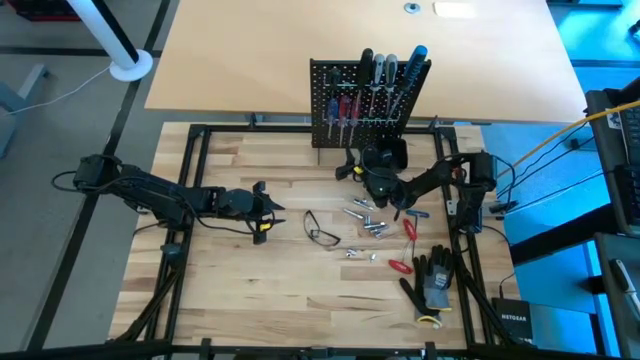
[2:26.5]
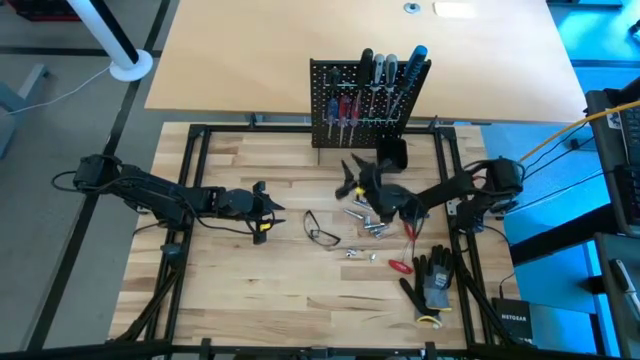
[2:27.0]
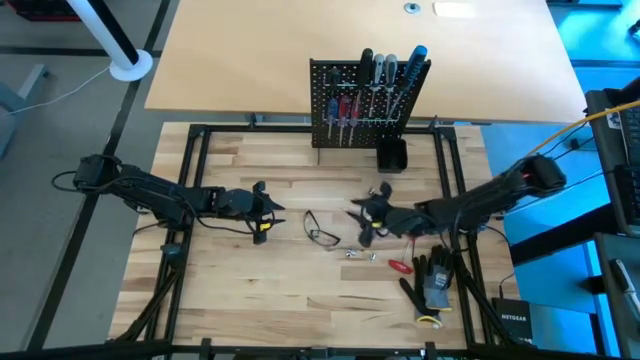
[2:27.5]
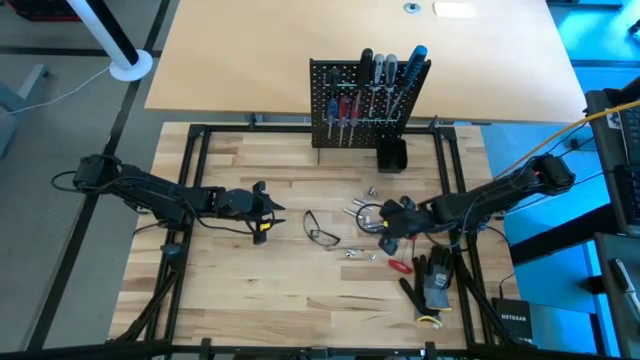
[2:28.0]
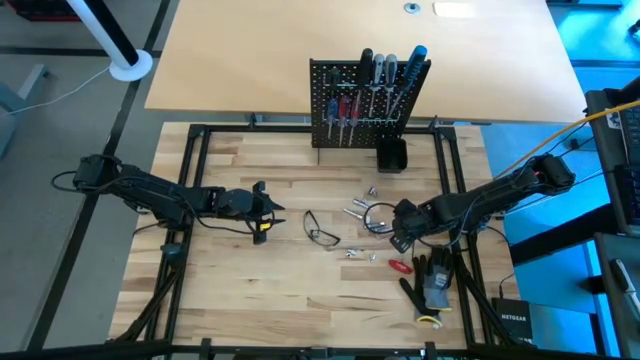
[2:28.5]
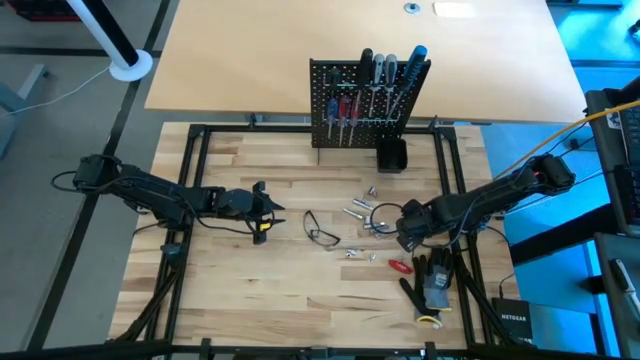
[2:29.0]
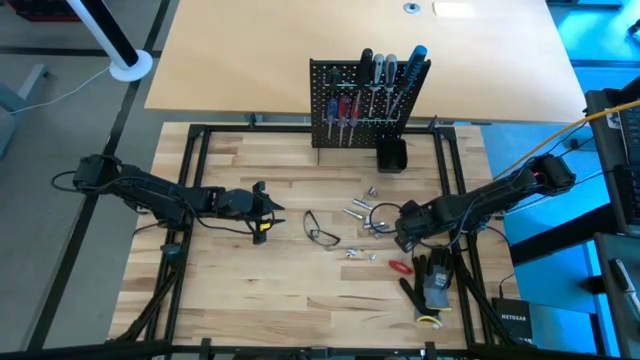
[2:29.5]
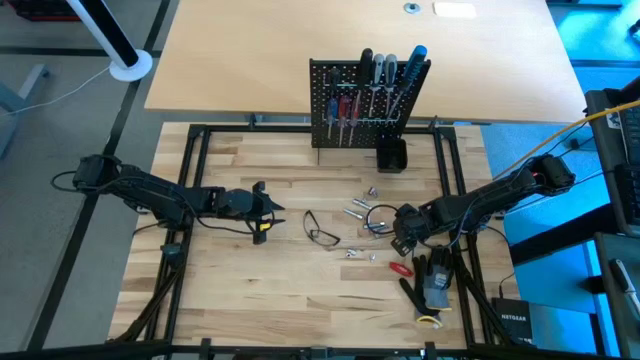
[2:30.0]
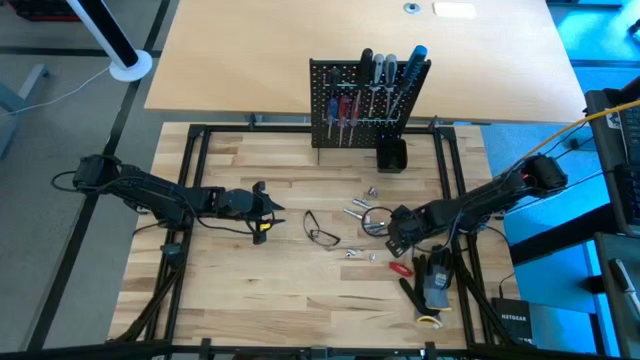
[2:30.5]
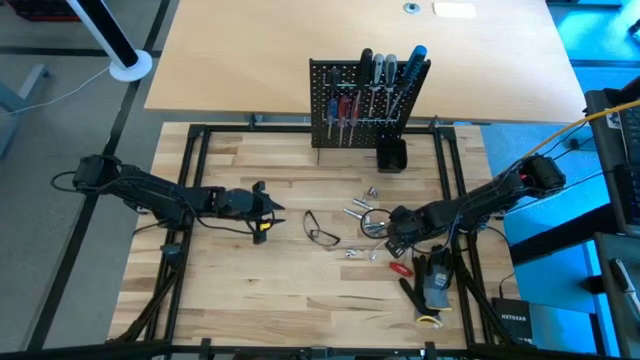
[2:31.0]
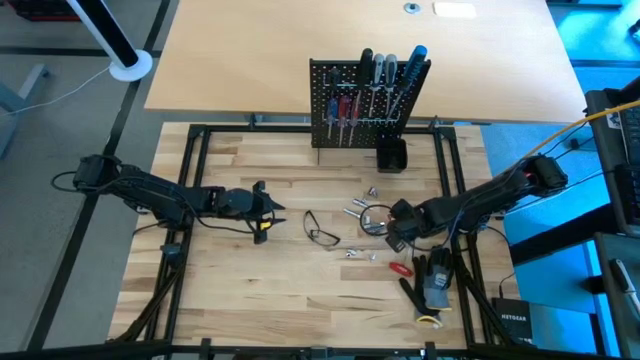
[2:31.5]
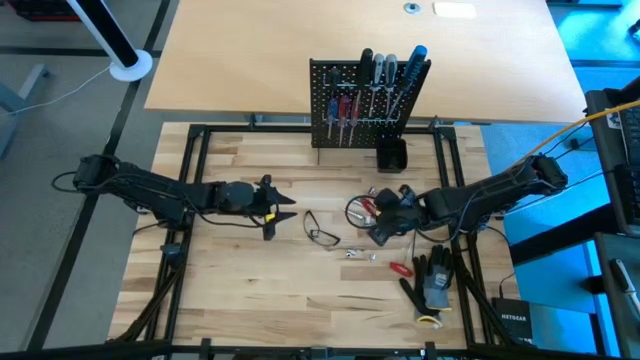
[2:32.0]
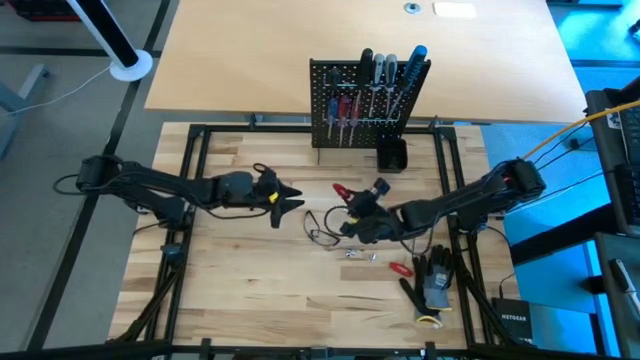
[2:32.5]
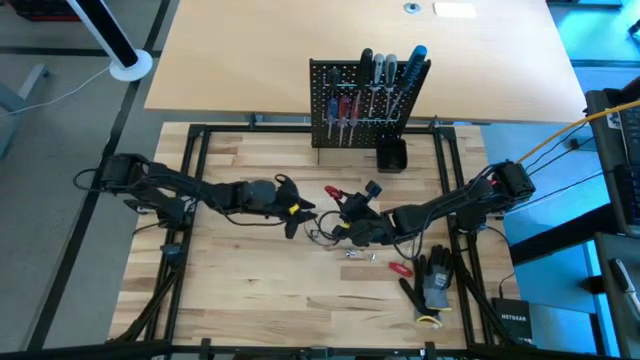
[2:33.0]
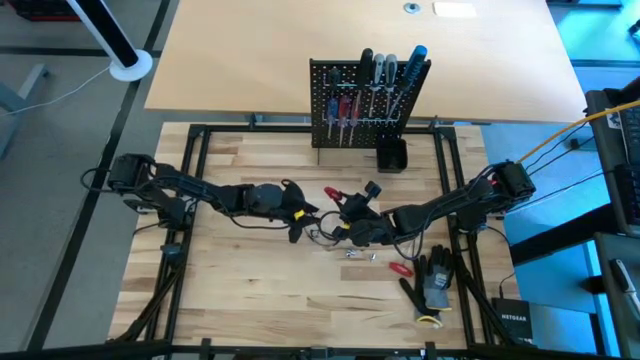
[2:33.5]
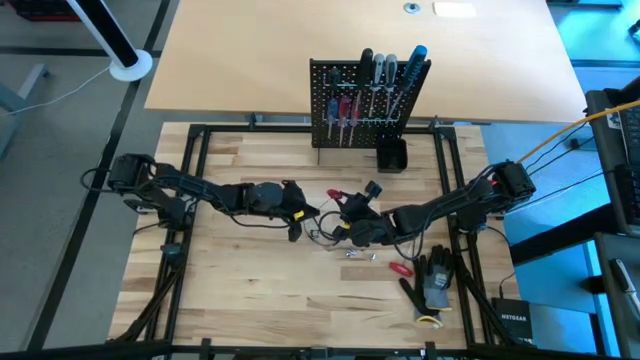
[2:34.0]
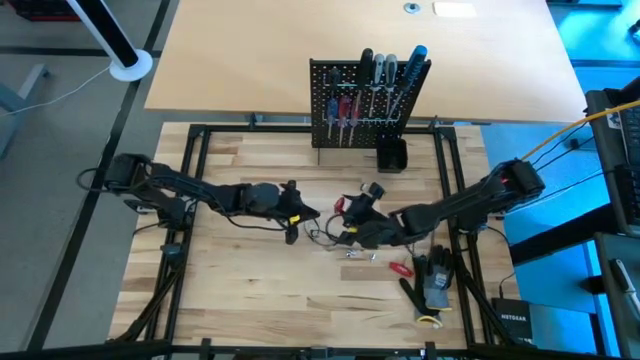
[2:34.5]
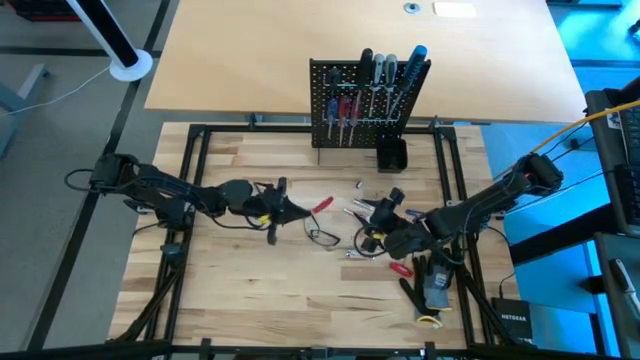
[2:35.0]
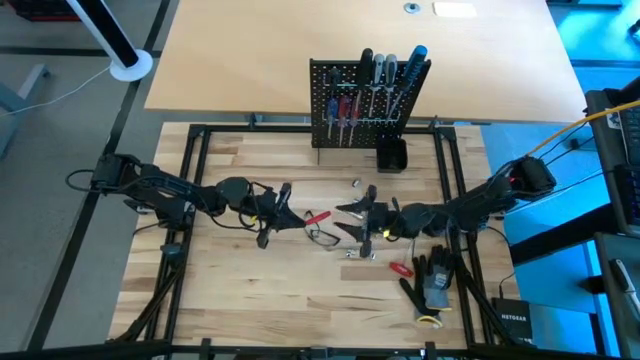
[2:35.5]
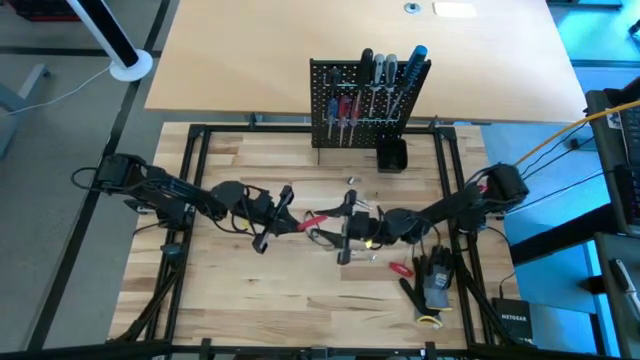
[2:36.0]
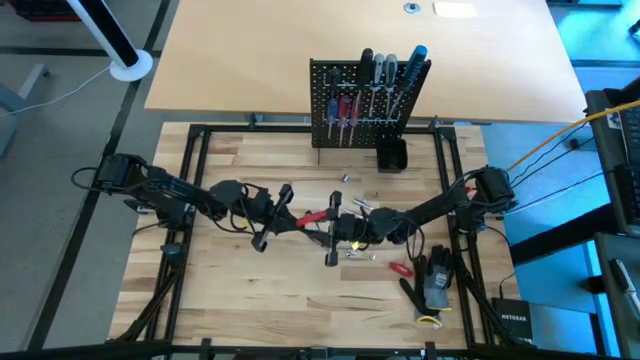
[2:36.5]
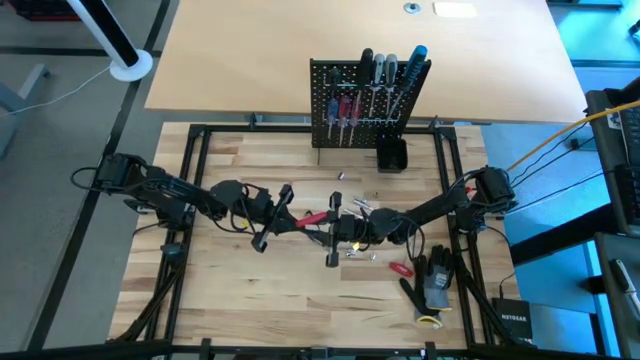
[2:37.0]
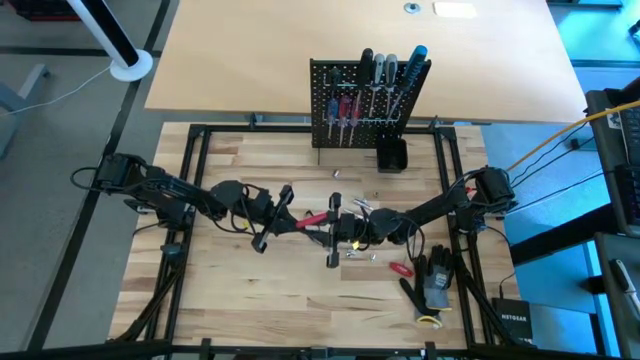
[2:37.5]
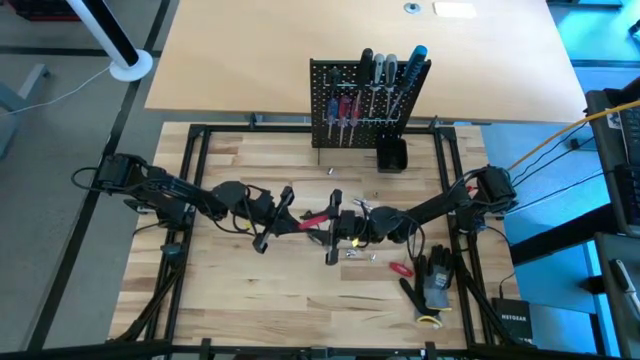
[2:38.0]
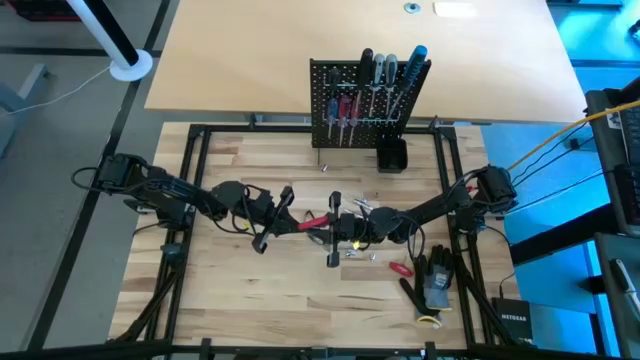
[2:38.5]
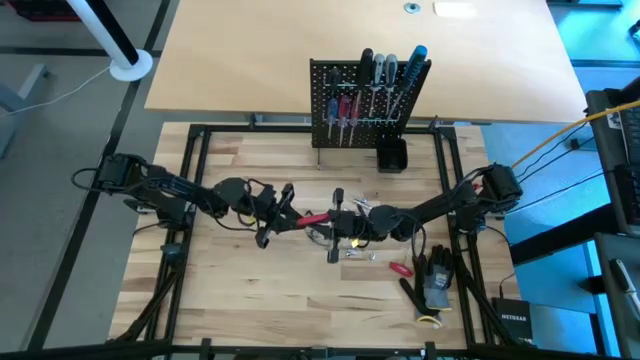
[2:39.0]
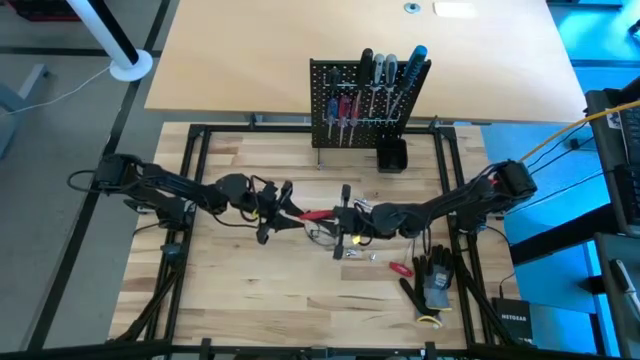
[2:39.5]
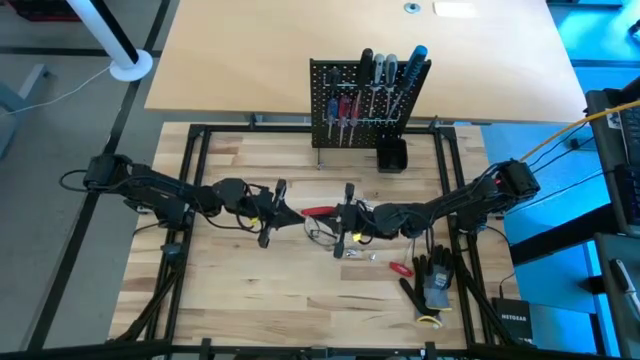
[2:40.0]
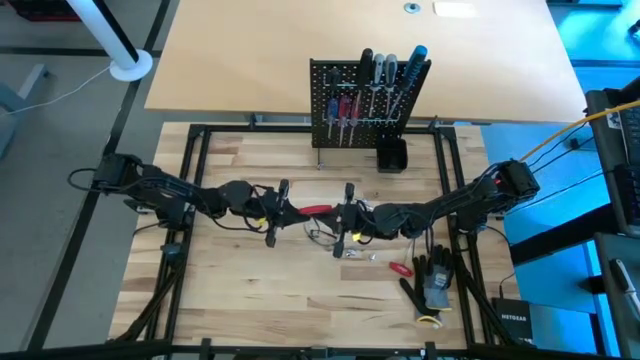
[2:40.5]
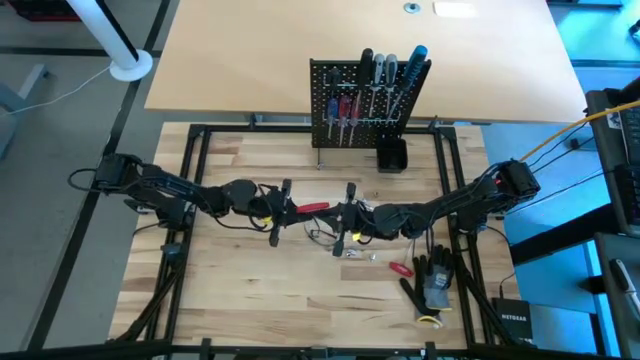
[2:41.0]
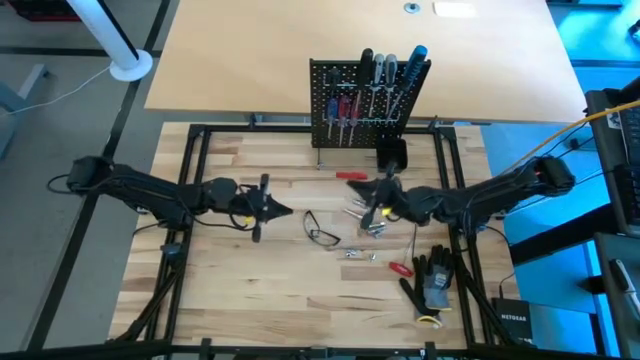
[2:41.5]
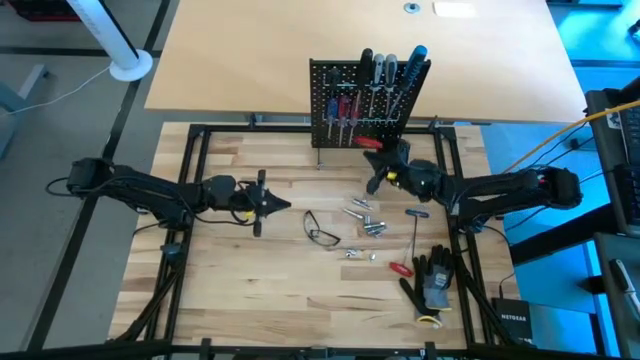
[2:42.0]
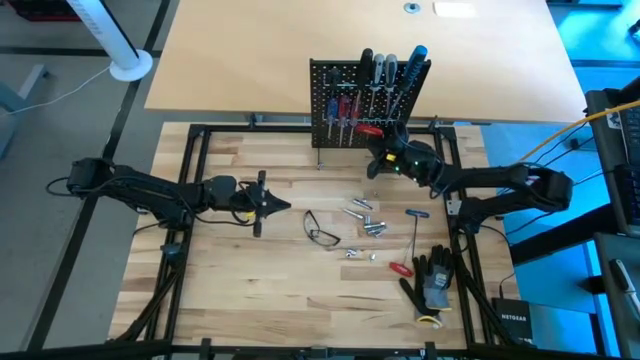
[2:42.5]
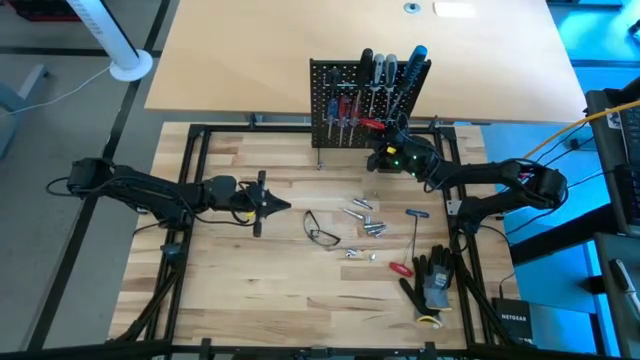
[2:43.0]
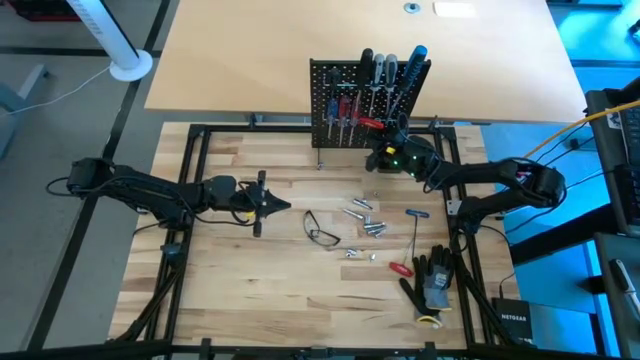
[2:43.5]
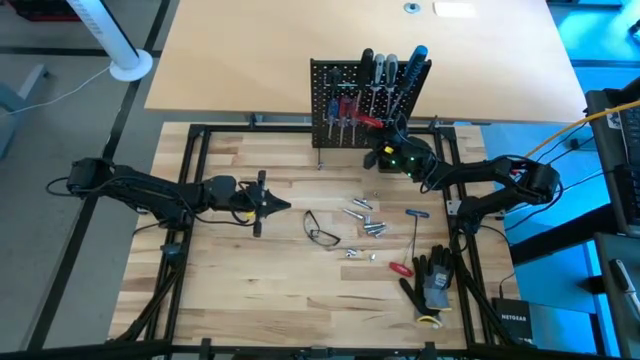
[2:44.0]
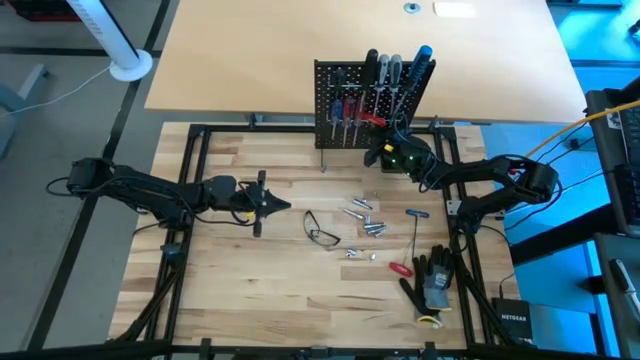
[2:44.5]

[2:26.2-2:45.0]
Task: Hang tools onto peg board
Hang the red allen wrench on the peg board

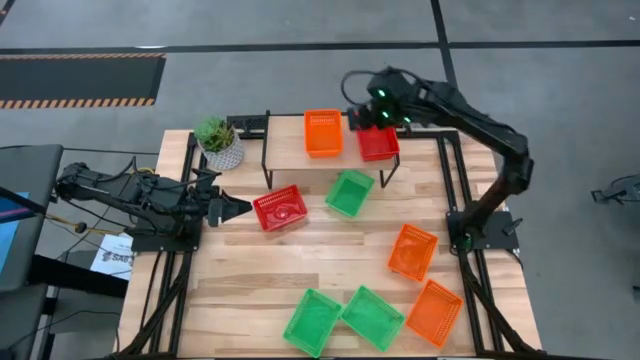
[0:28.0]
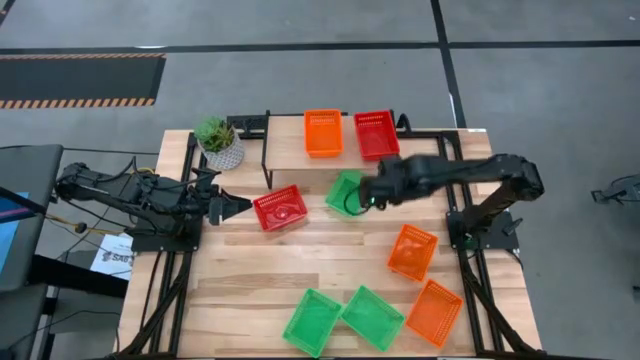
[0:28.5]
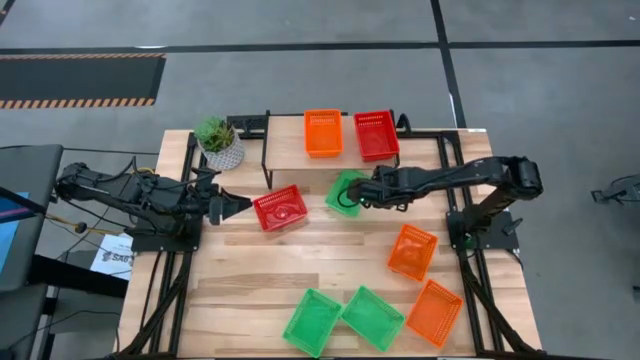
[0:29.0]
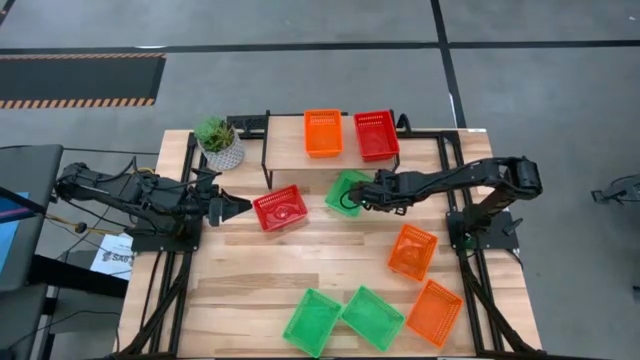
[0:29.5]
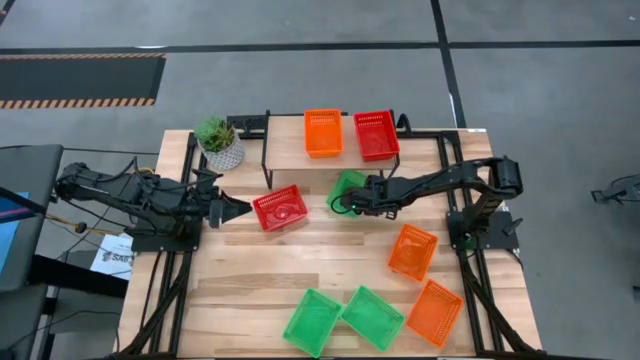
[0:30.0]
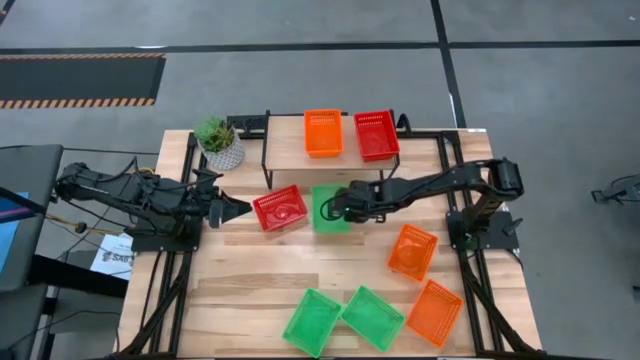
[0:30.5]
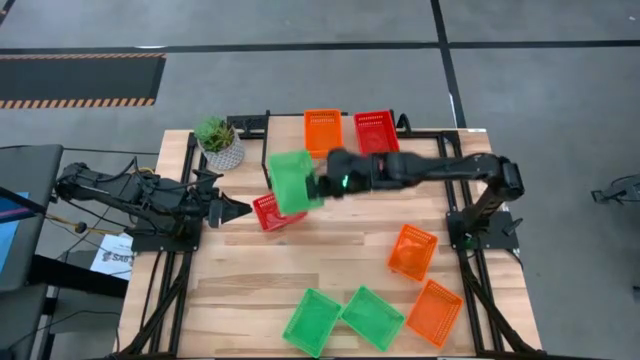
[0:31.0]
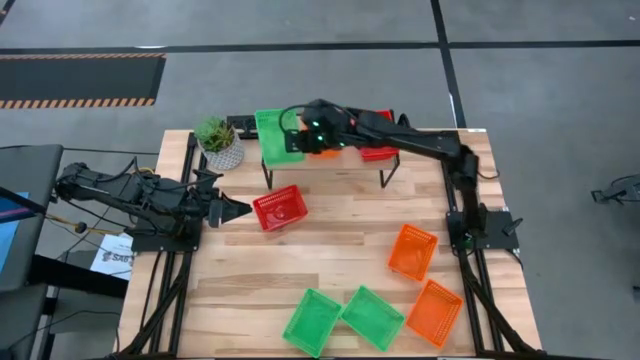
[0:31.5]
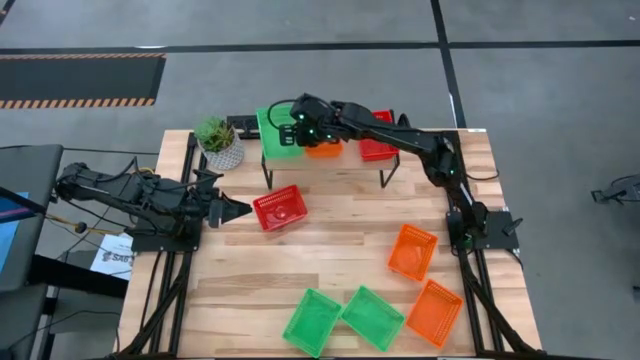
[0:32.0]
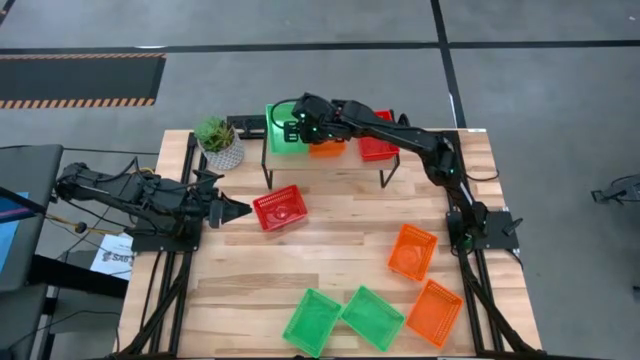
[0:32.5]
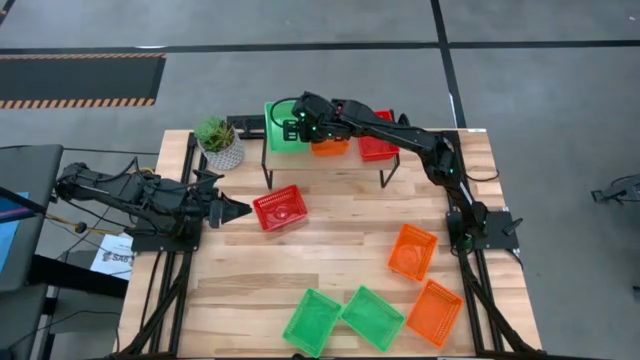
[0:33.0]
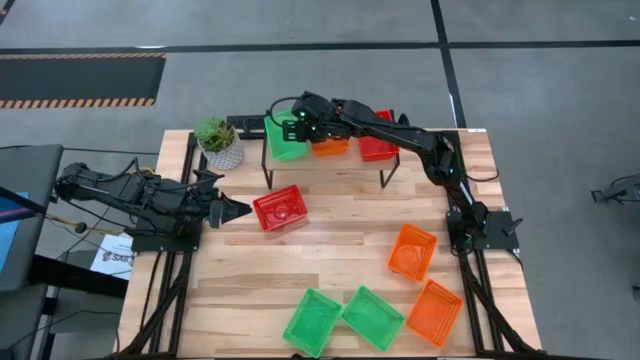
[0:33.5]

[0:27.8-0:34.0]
Task: Stack baskets on shelf by color
Put the top center green bin on the shelf
